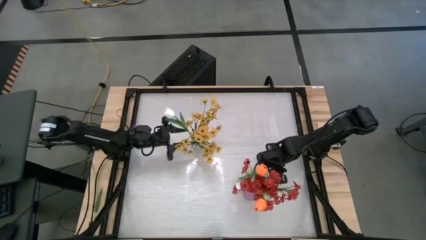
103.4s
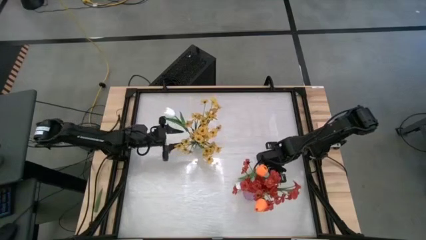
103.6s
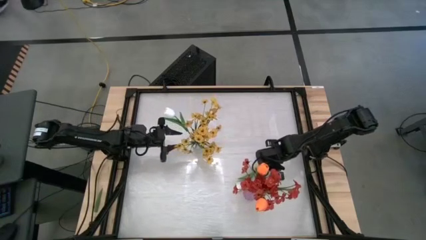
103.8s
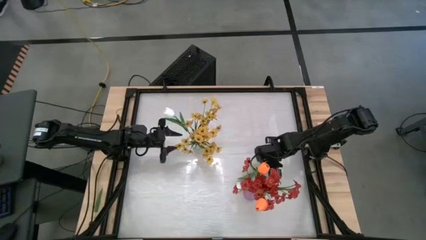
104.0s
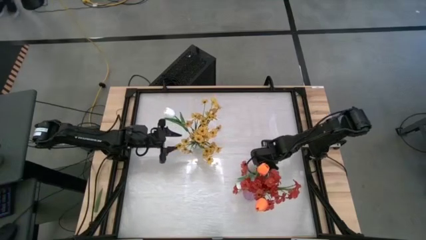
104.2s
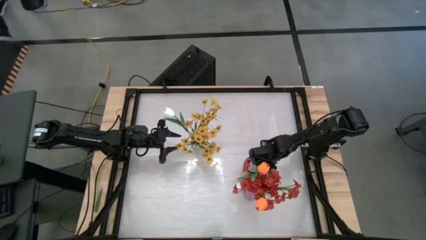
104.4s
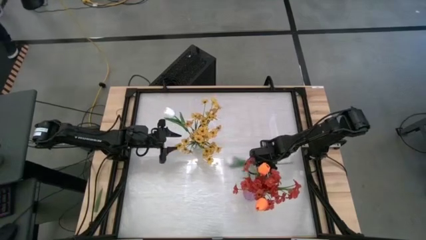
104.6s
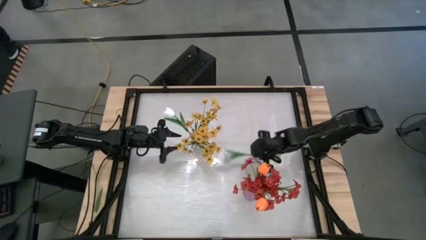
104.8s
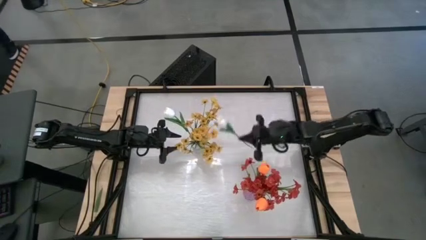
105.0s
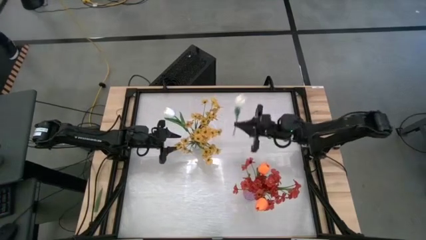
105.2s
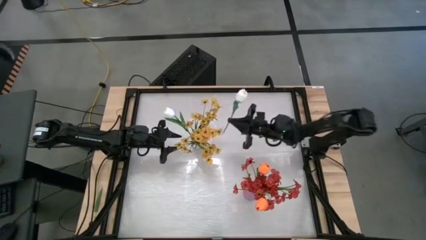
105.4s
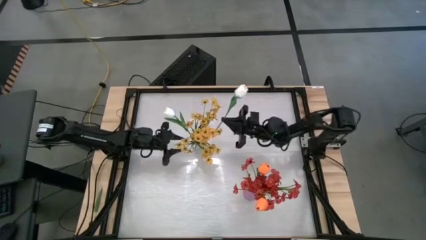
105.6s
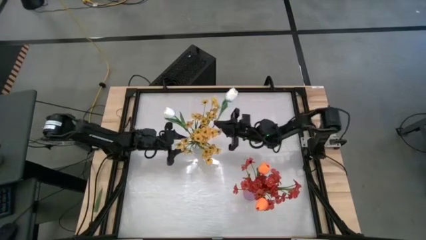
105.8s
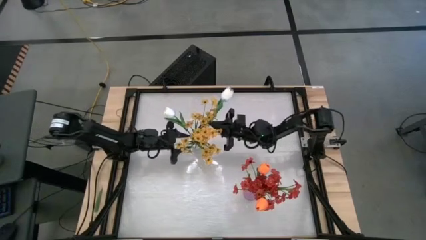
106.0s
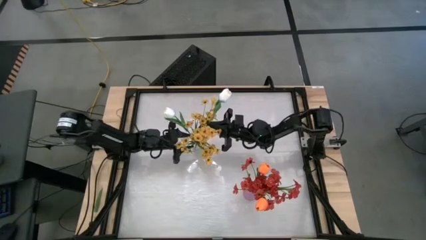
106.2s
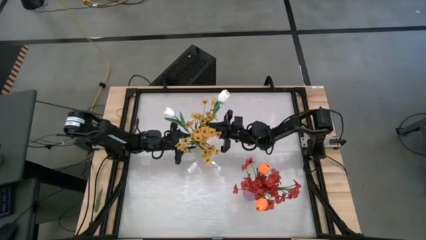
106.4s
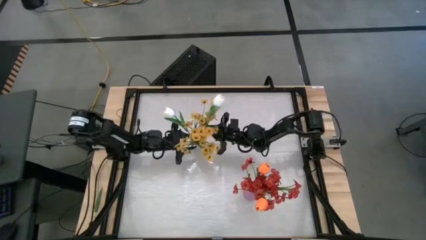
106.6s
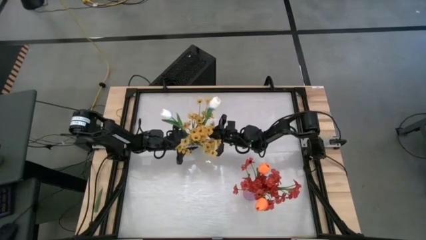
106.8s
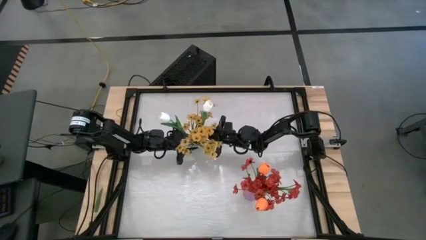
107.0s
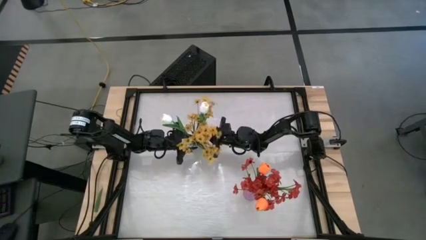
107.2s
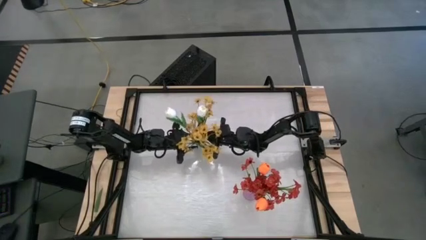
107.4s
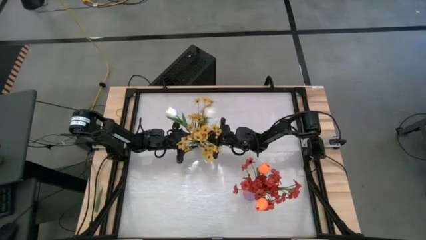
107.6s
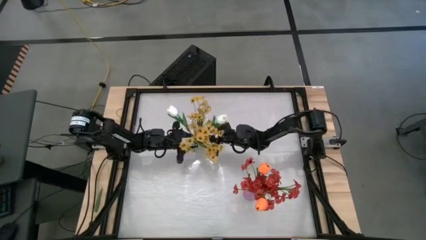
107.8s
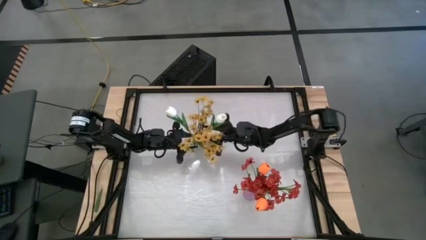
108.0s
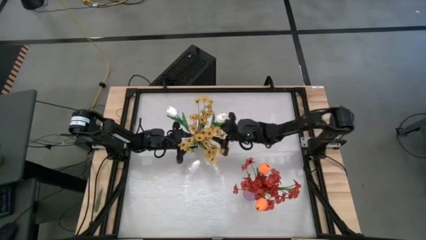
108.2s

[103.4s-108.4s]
Task: Sort flowers into vase by color
Put the white flower into the transparent vase

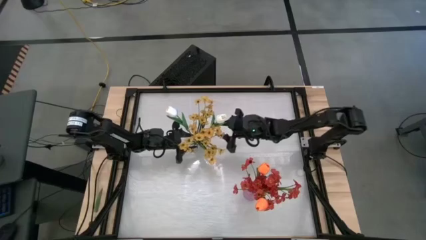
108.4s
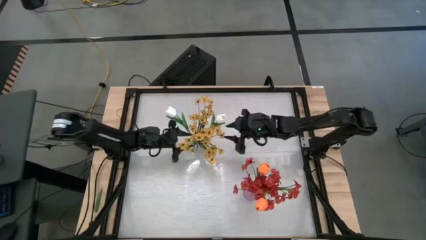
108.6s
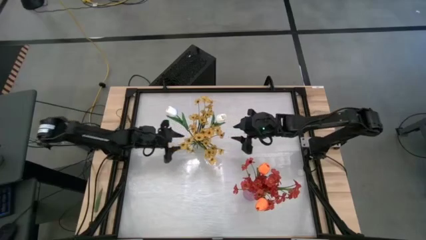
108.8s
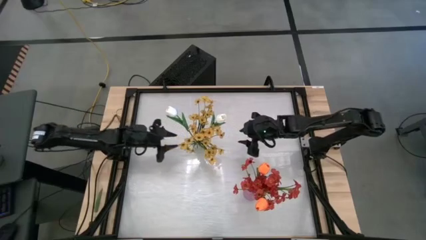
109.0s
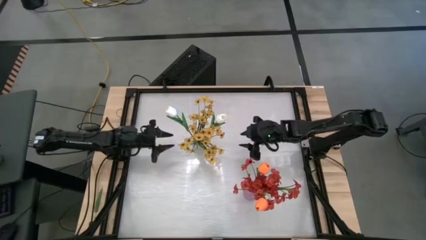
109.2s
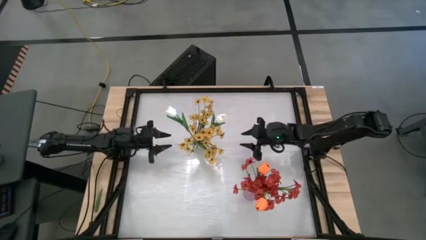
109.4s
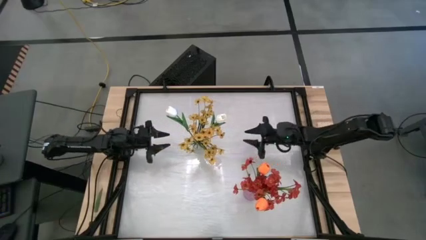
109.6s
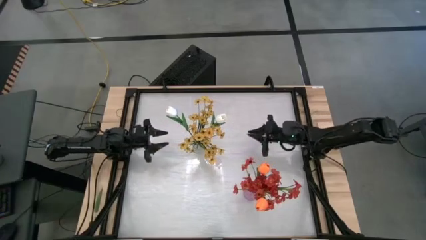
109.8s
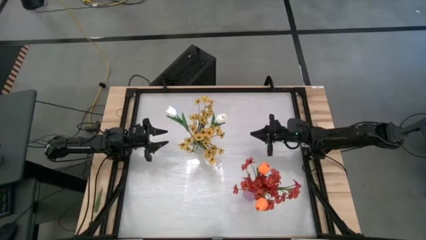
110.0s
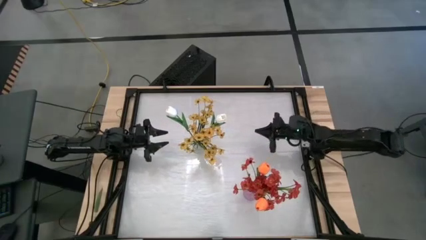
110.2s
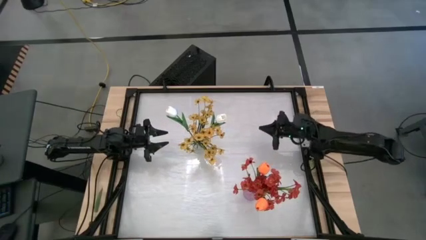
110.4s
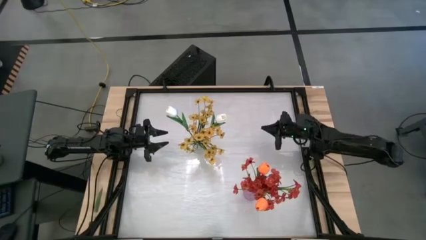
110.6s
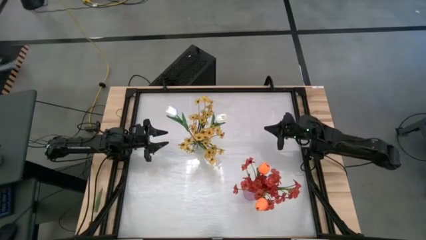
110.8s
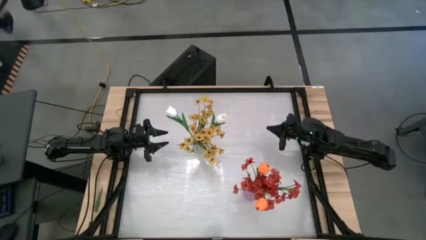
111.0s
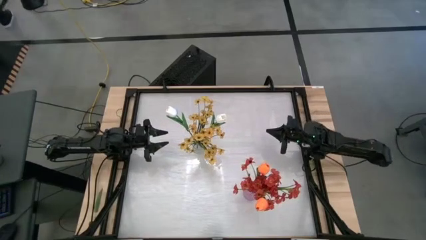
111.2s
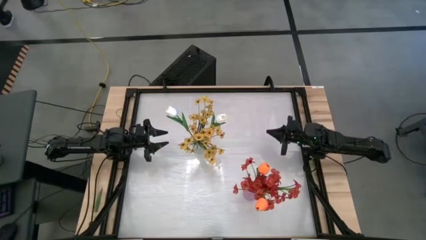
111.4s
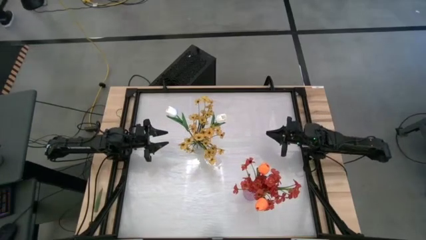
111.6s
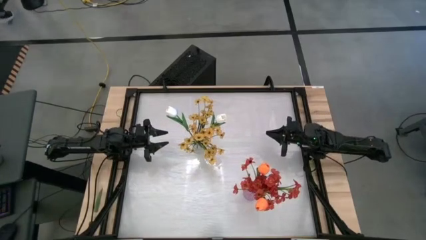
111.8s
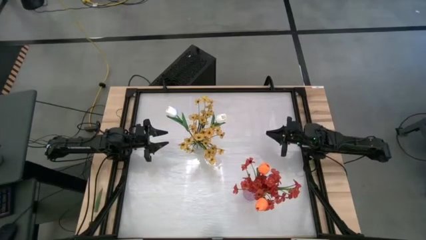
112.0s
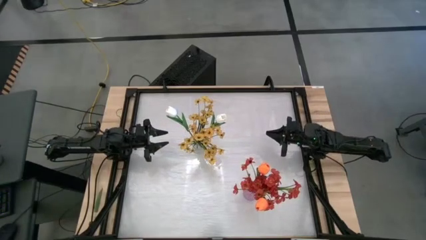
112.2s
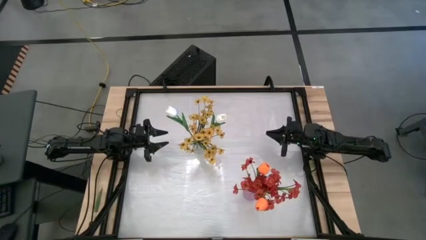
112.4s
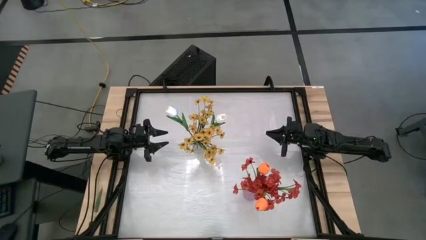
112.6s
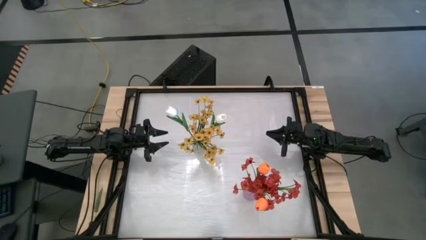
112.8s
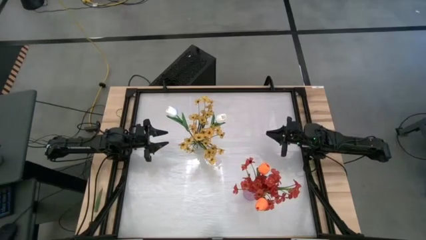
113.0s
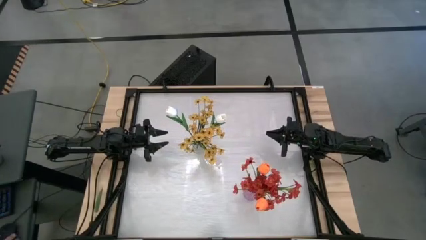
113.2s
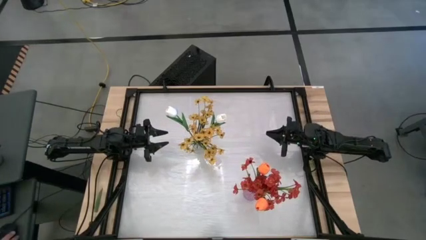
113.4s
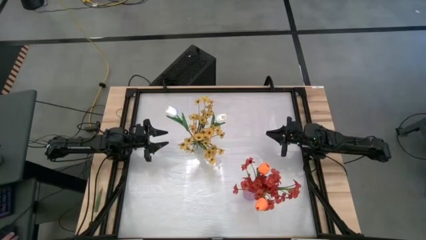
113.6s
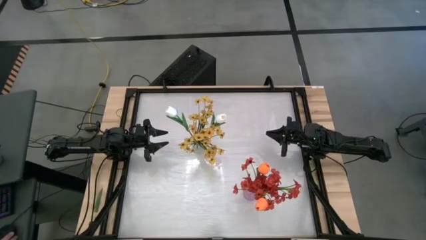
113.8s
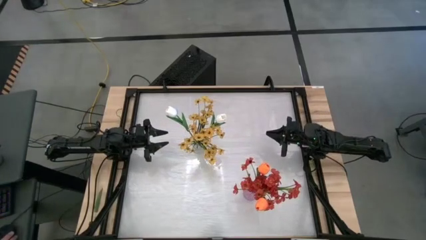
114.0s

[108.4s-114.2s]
Return to Home Position

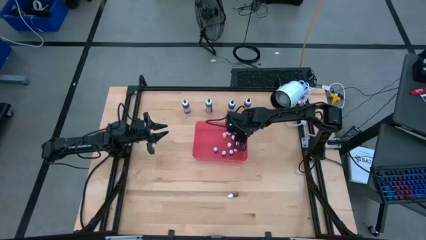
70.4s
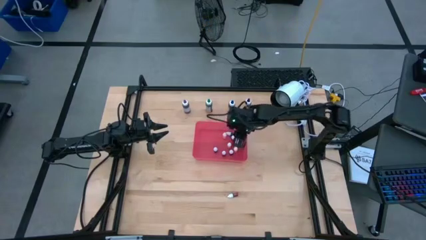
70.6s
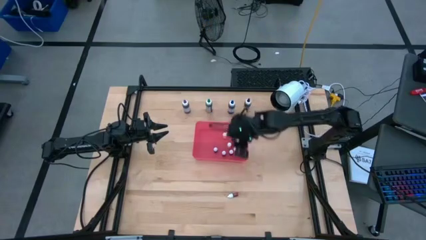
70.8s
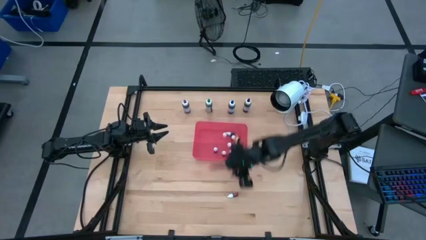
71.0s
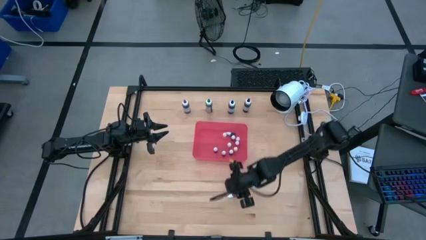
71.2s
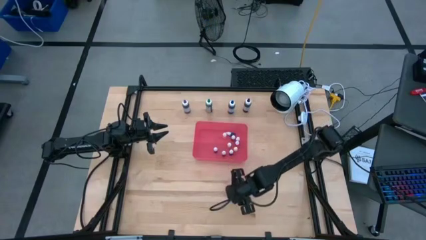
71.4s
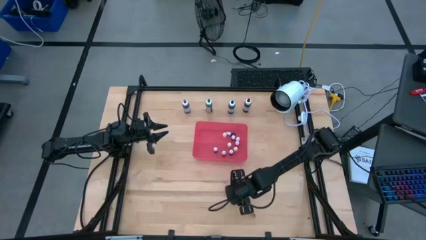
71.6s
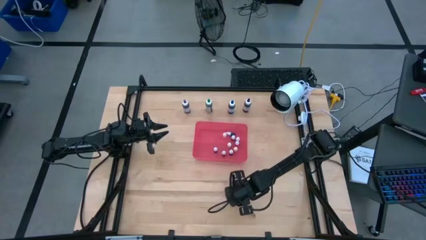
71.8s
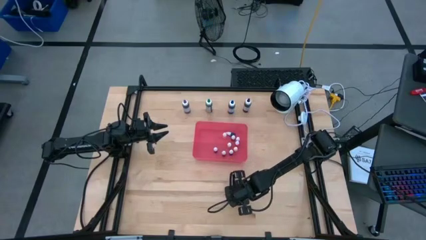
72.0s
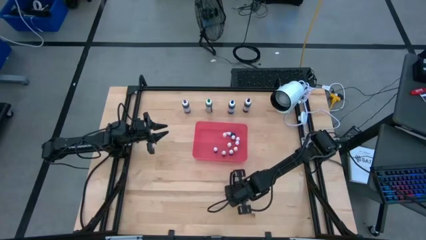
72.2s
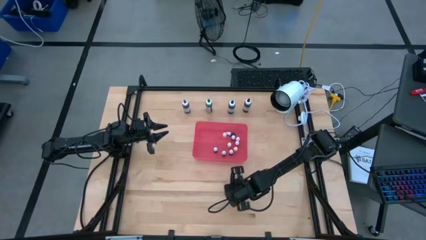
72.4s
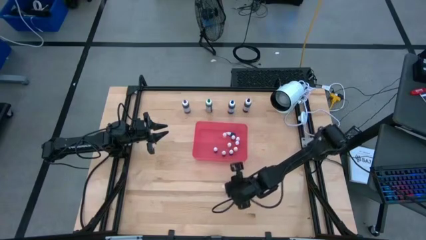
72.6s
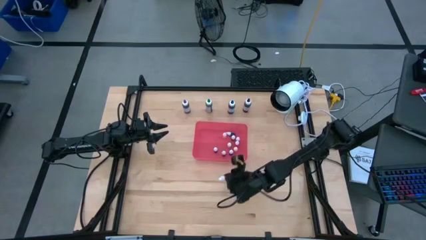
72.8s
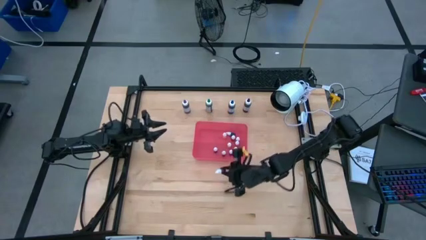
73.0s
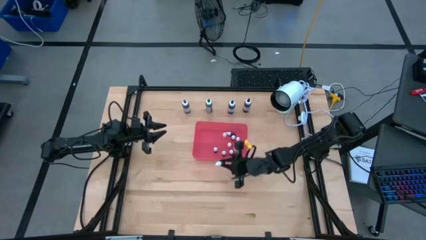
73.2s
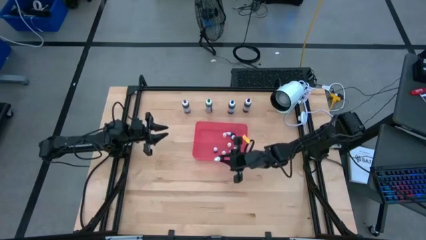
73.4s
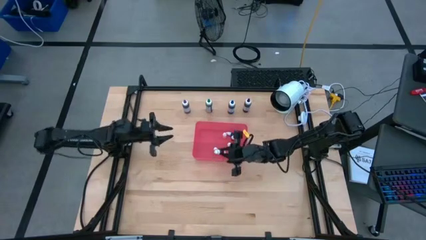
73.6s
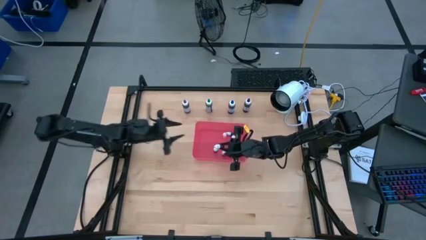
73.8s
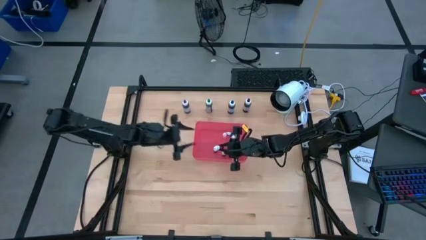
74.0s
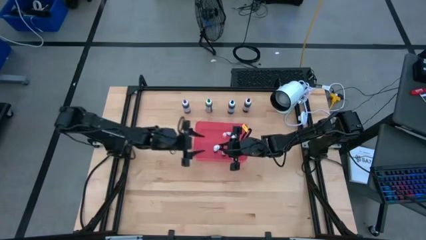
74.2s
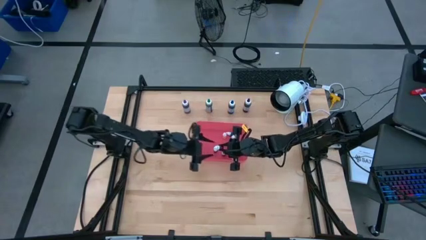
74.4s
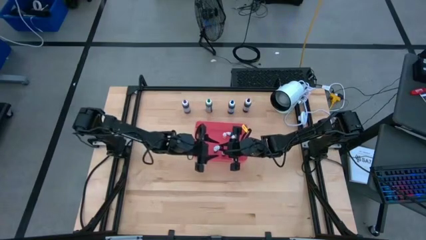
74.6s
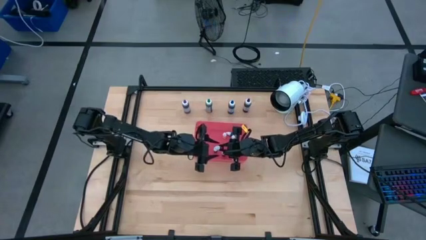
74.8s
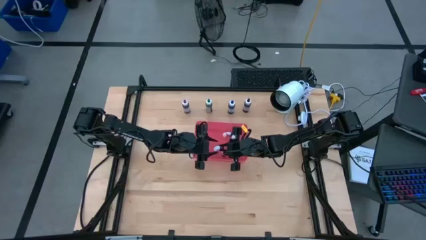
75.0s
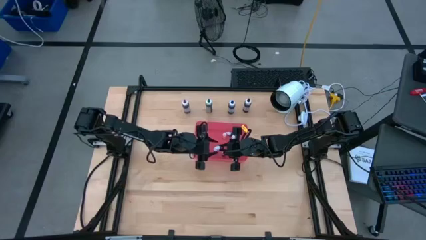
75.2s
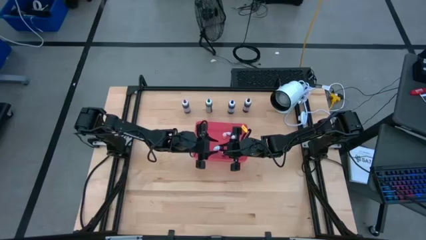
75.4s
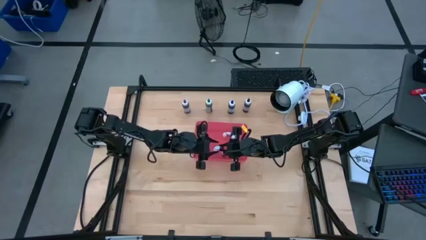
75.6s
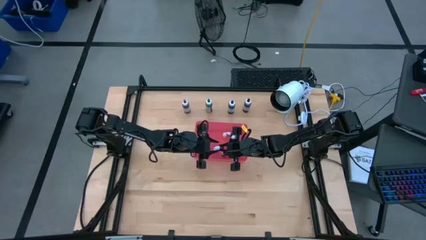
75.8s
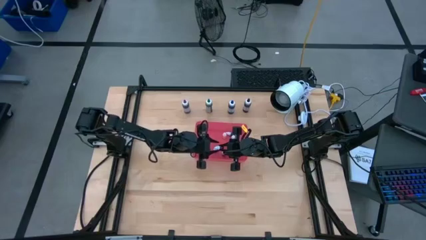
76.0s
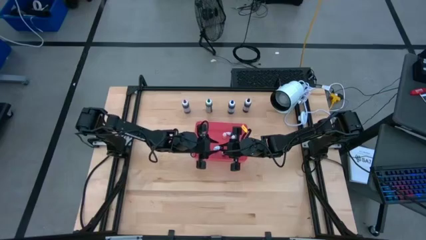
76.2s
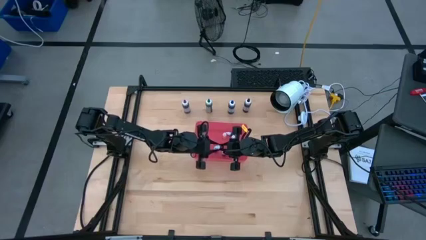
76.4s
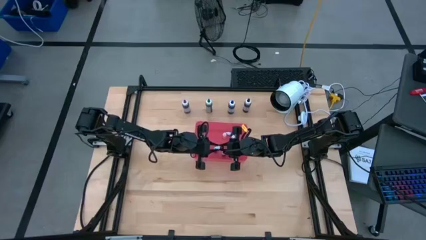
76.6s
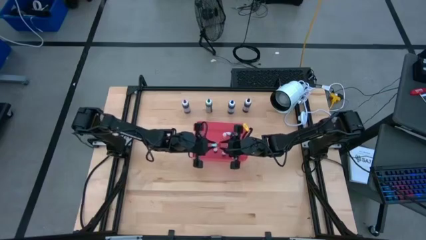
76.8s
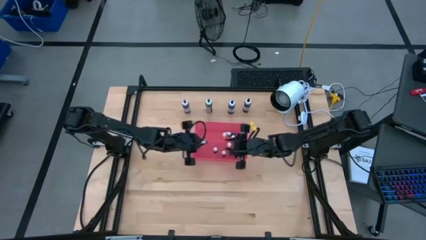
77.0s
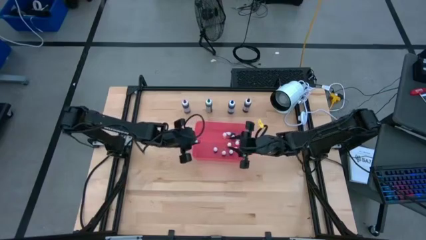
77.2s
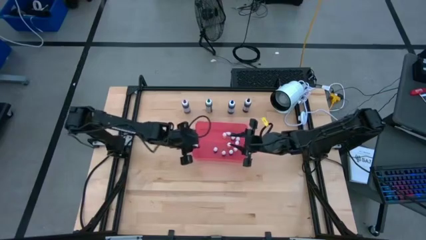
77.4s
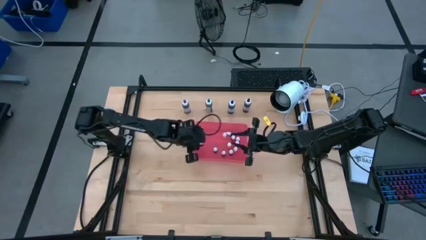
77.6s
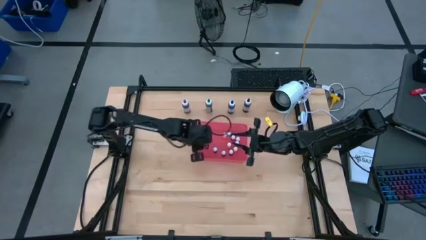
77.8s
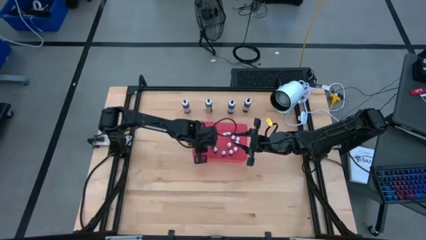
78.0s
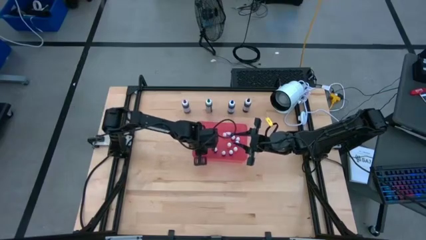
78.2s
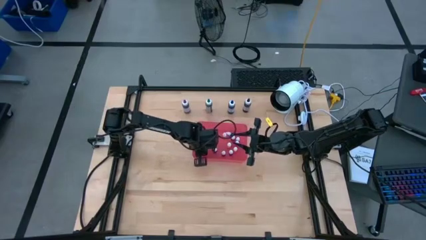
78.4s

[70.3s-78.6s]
Task: Pick & Place food coloring
Put the small red food coloring bottle into the red bin
